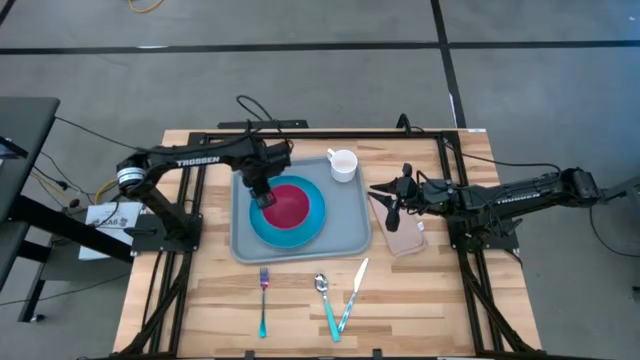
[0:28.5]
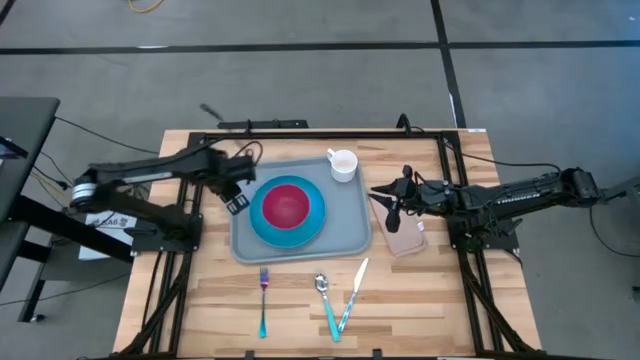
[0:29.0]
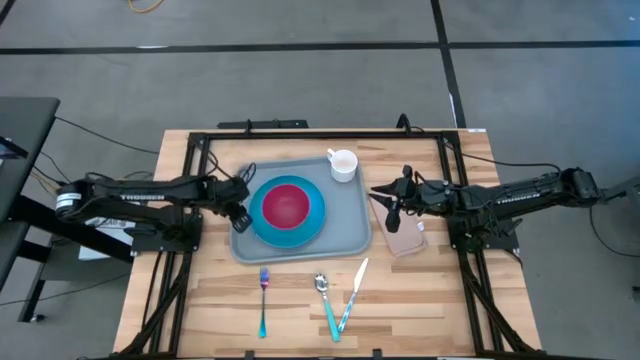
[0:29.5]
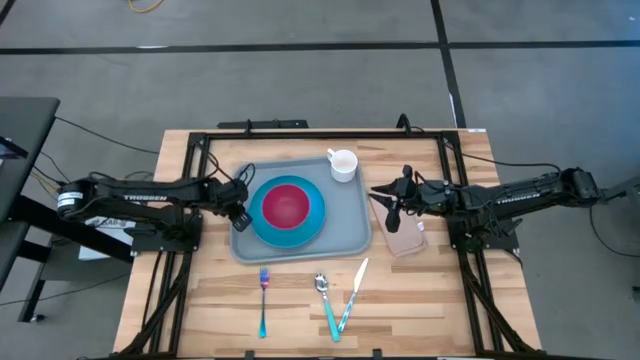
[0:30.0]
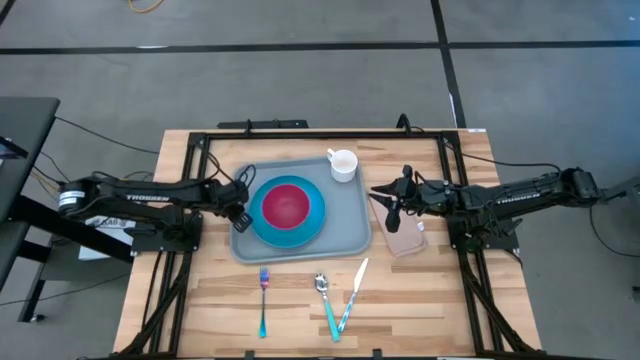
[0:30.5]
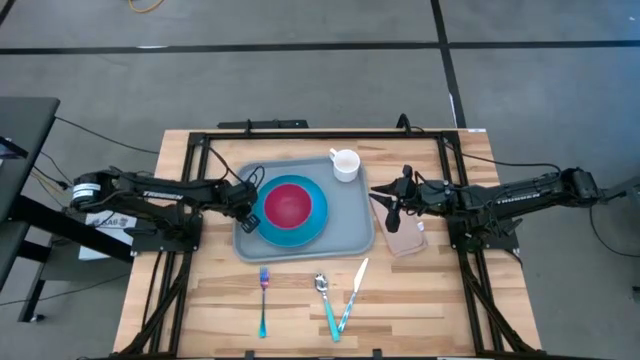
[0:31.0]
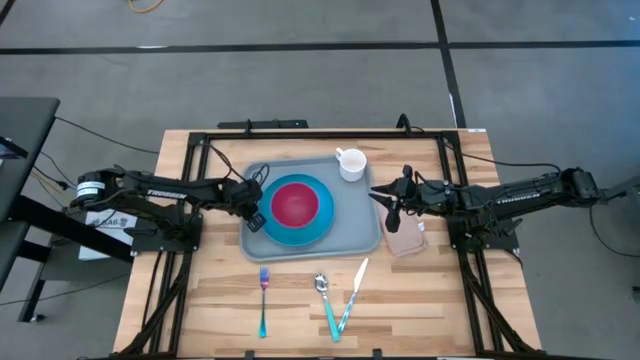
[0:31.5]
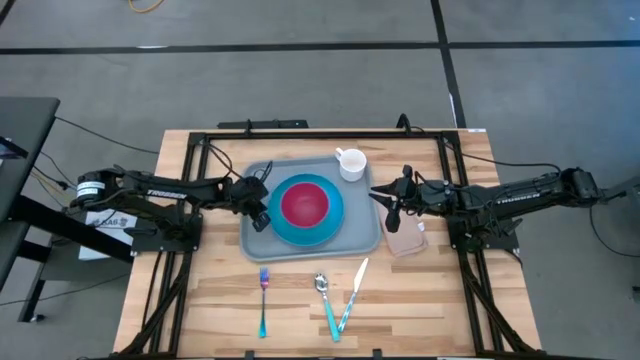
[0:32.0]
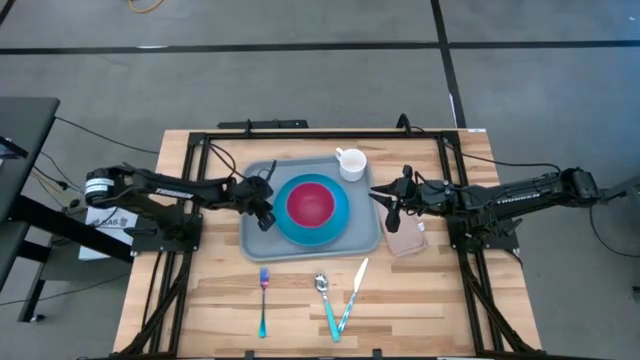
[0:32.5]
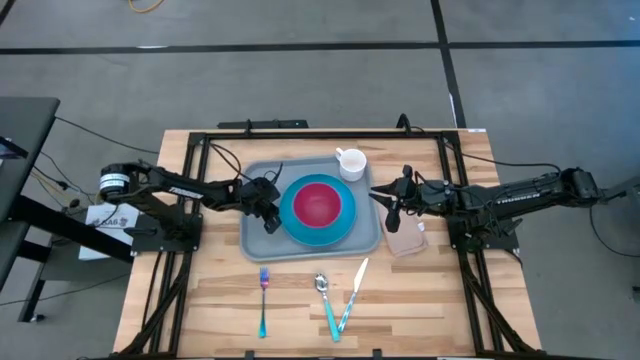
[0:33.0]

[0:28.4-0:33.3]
Task: Set up tray
Adjust the plate

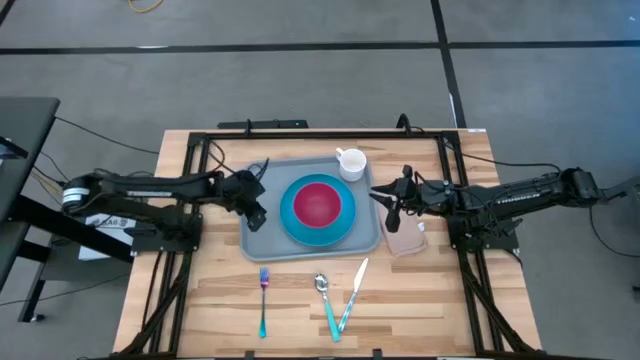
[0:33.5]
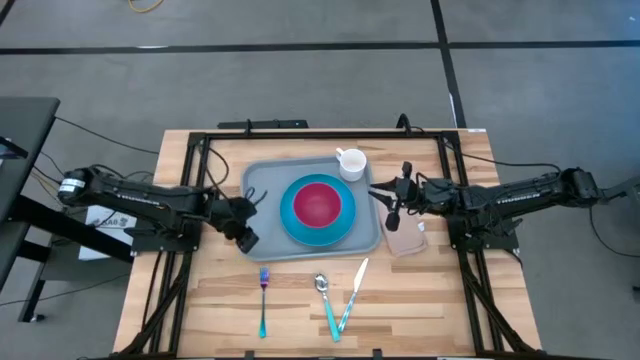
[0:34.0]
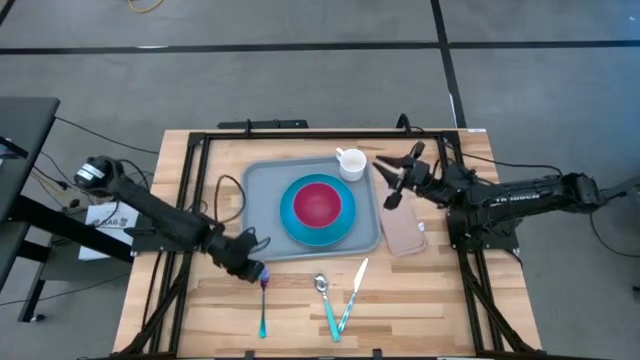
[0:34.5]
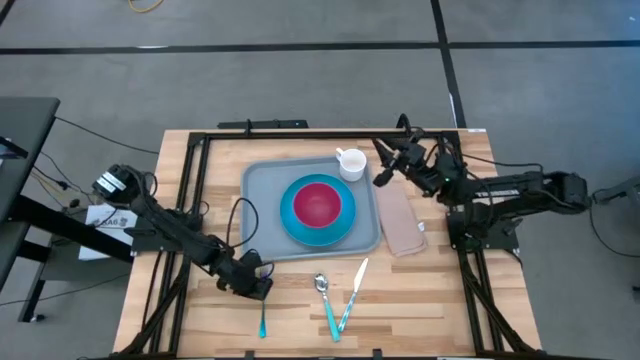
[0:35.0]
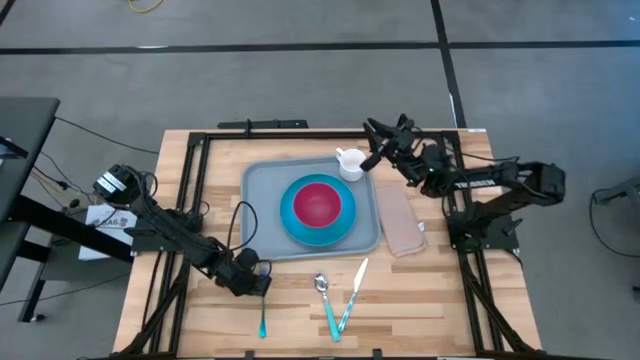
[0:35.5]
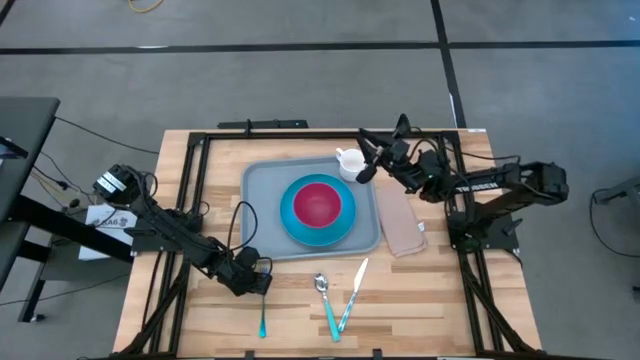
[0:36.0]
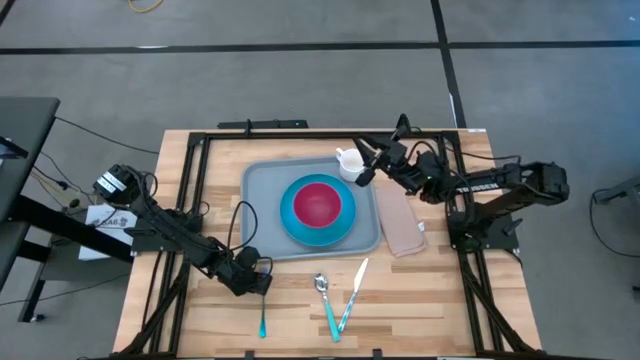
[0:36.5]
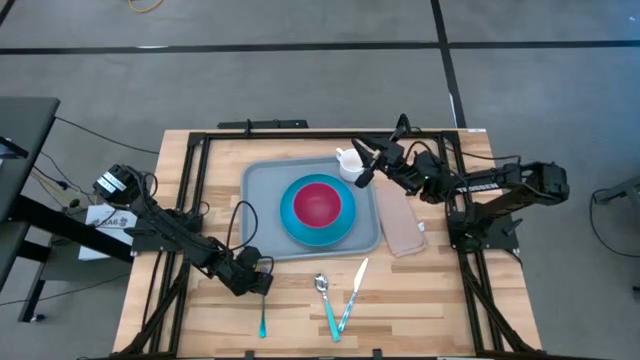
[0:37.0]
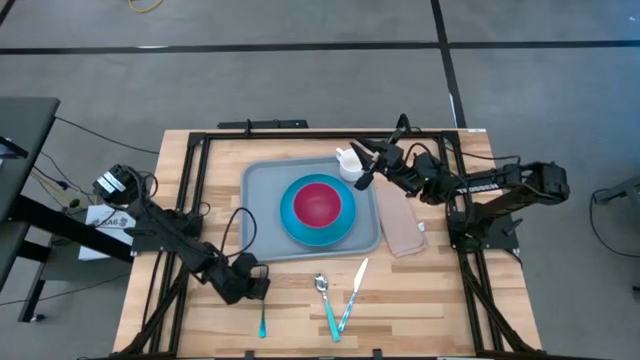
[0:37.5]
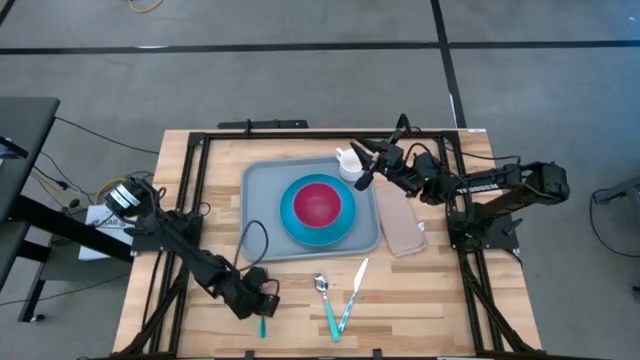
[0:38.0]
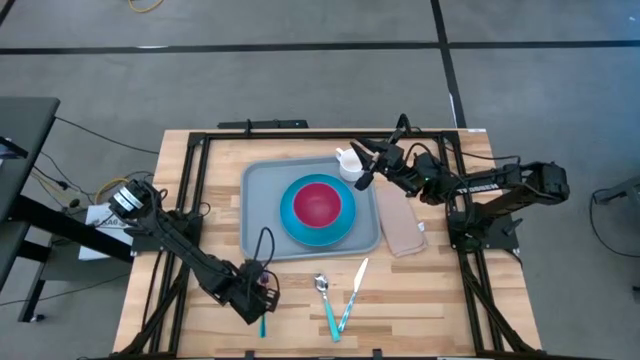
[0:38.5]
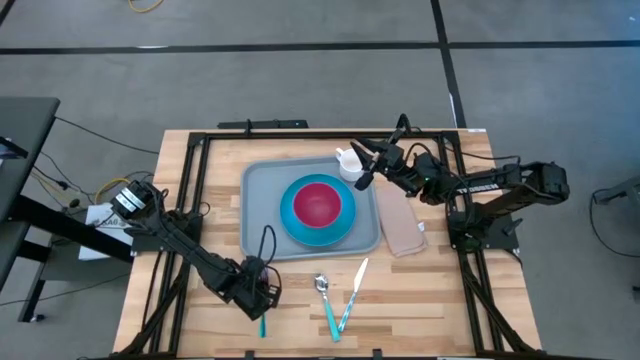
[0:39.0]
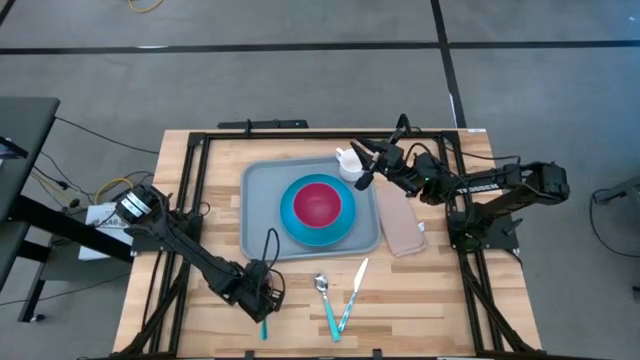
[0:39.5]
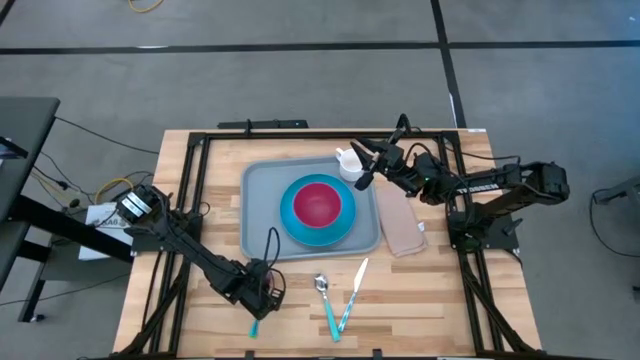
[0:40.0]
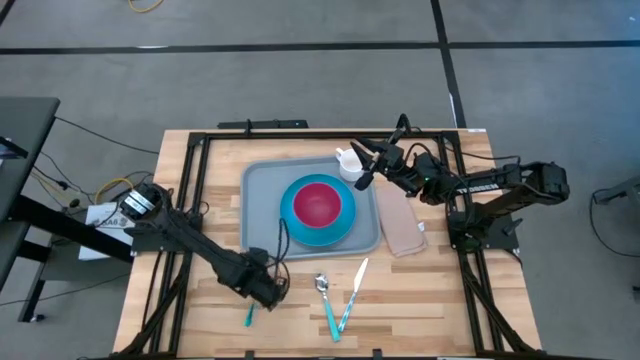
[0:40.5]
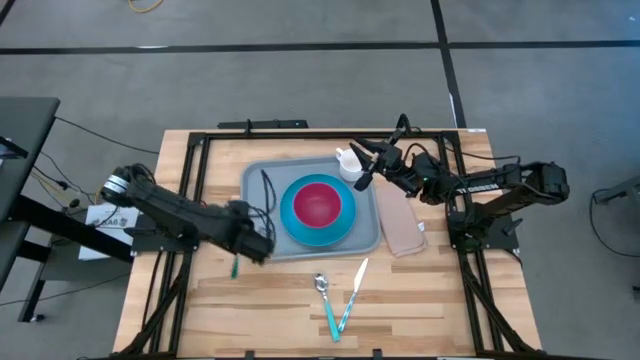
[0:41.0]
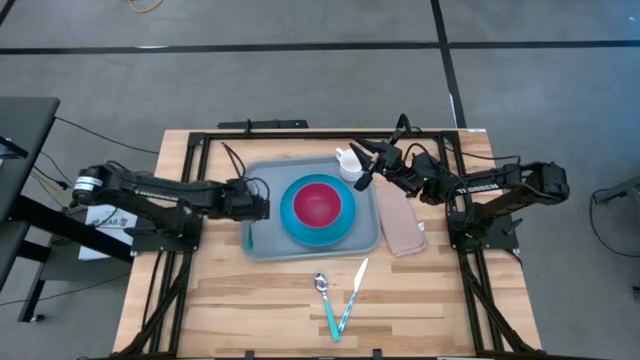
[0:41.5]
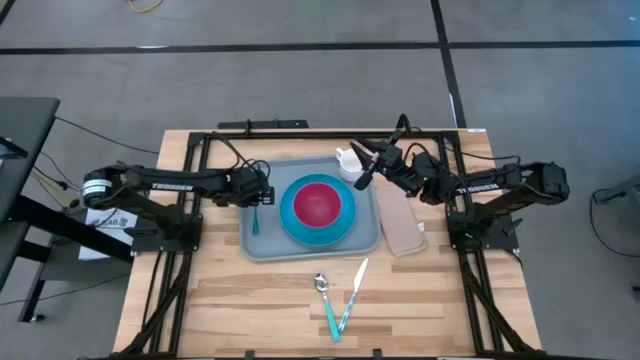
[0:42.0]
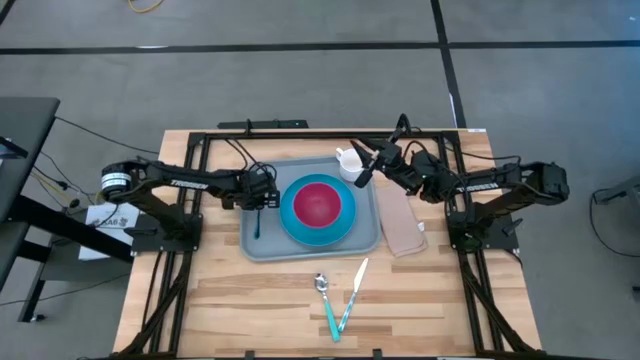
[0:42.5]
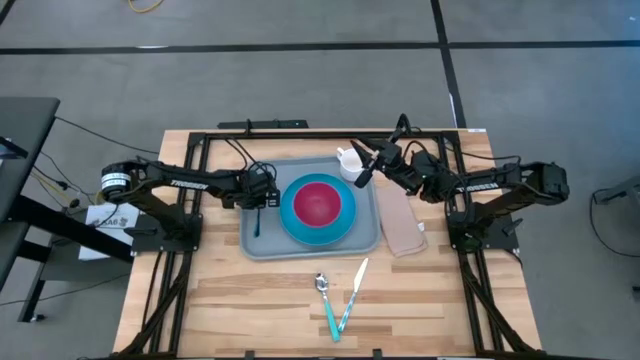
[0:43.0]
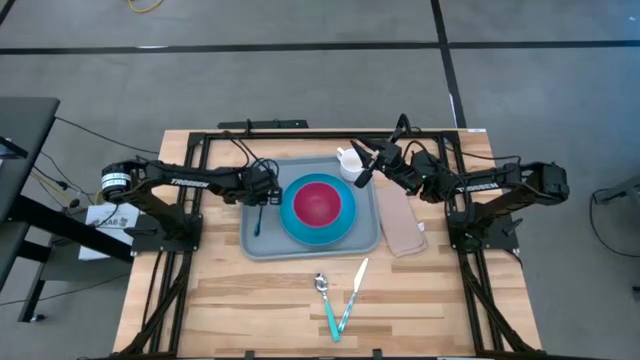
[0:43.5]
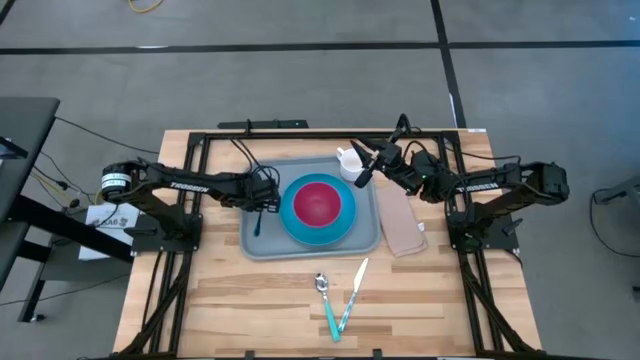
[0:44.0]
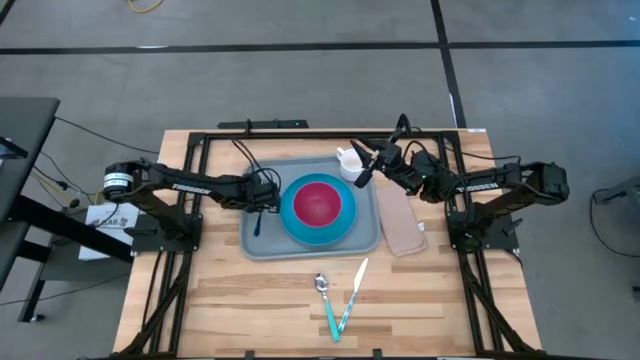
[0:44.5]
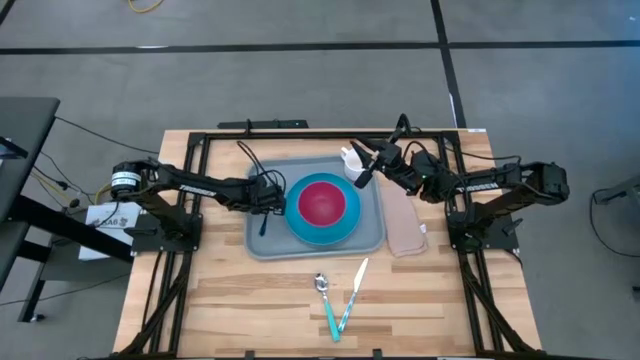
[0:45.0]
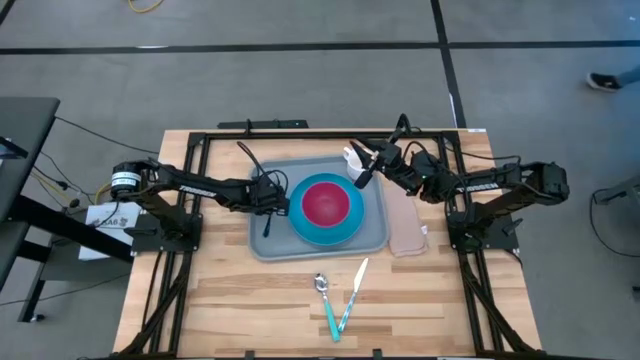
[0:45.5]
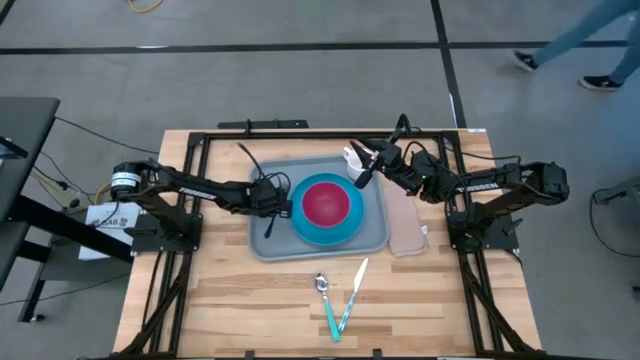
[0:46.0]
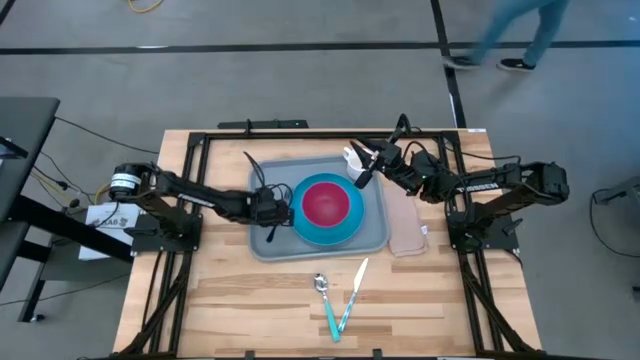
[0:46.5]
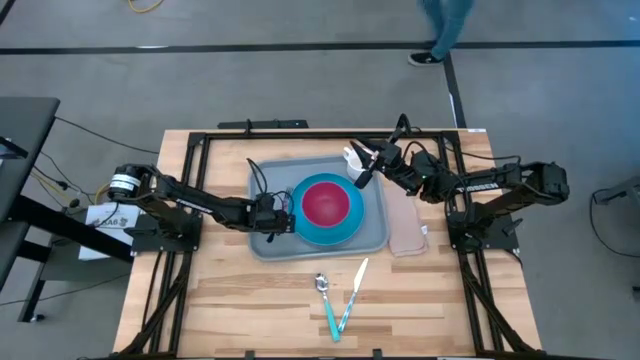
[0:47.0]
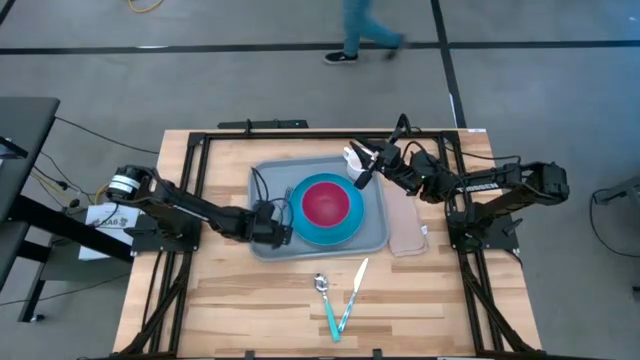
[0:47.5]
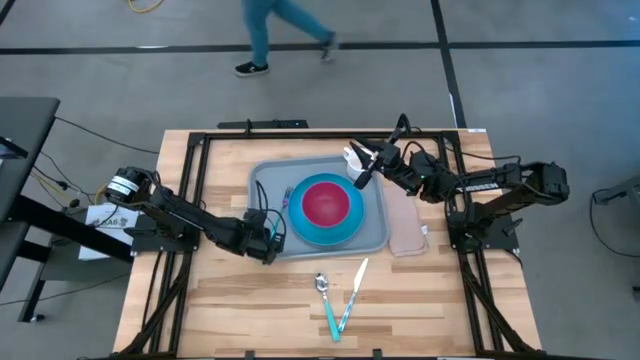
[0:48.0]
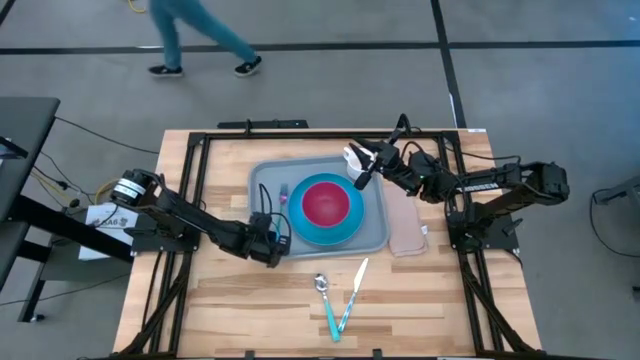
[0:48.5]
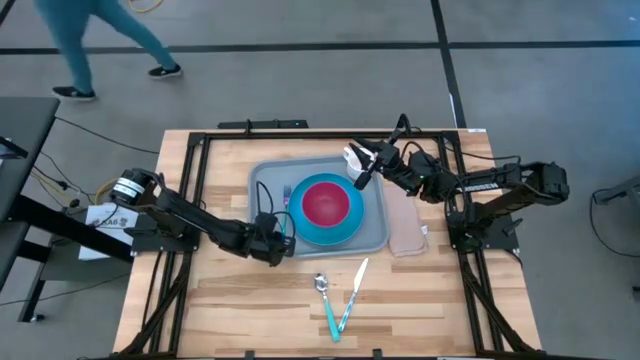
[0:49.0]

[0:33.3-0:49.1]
Put the fork to the left side of the blue plate on the tray
